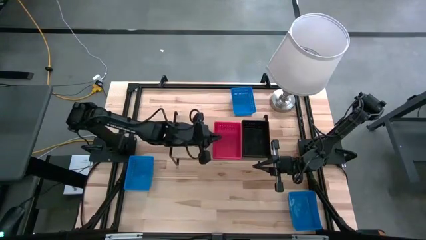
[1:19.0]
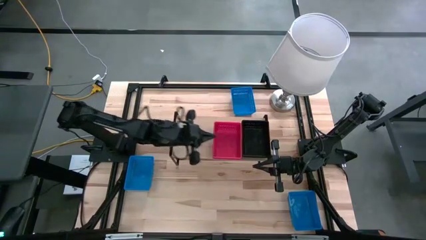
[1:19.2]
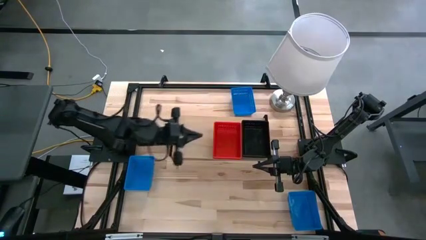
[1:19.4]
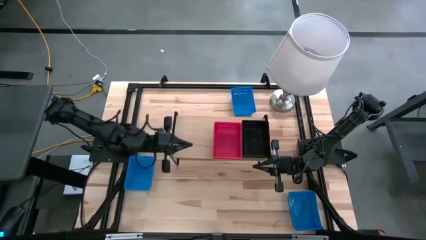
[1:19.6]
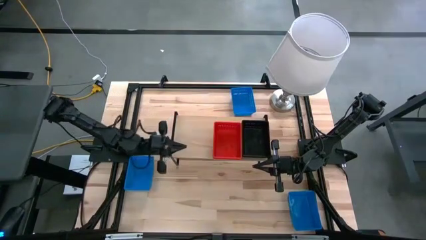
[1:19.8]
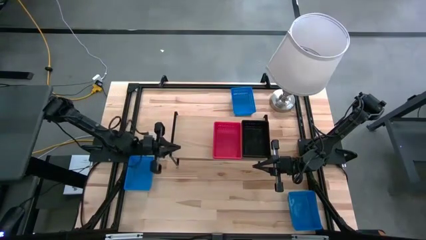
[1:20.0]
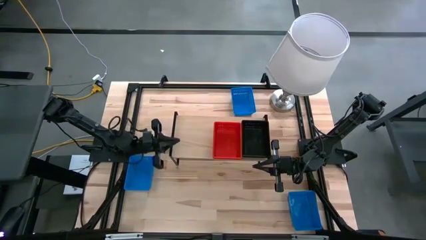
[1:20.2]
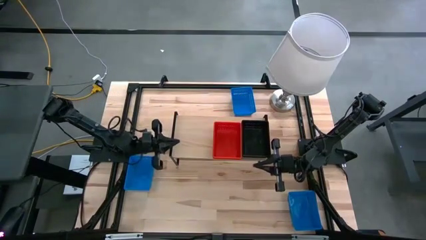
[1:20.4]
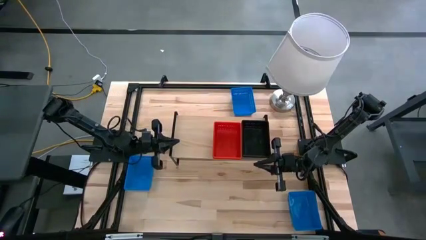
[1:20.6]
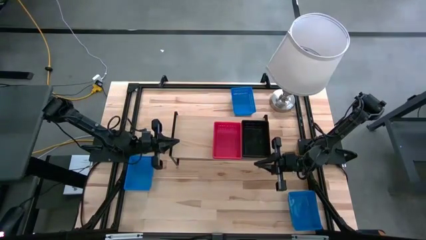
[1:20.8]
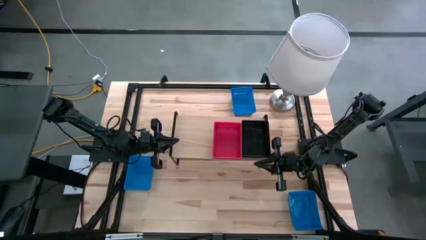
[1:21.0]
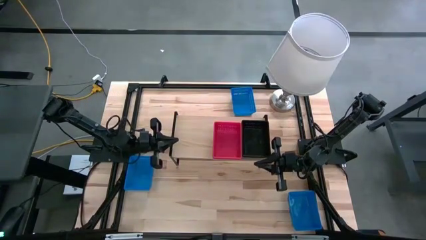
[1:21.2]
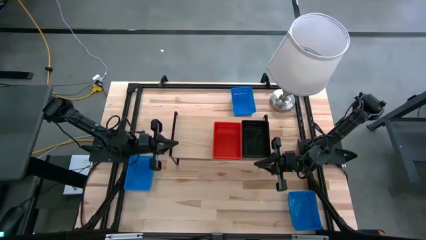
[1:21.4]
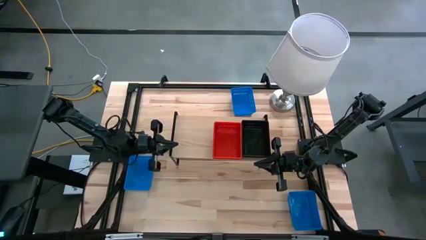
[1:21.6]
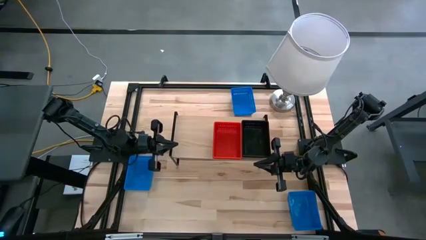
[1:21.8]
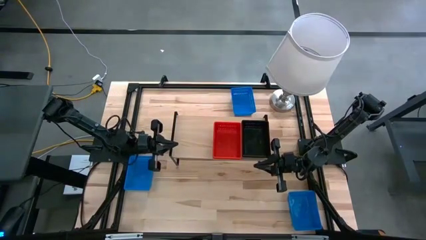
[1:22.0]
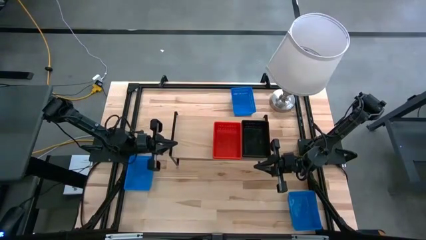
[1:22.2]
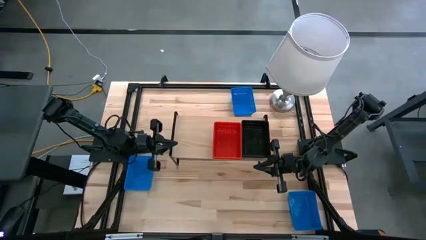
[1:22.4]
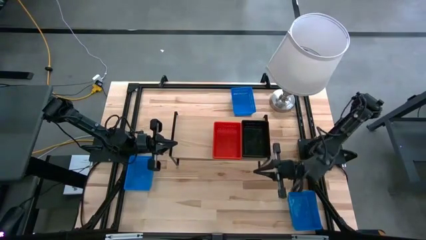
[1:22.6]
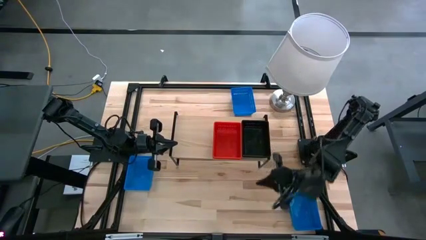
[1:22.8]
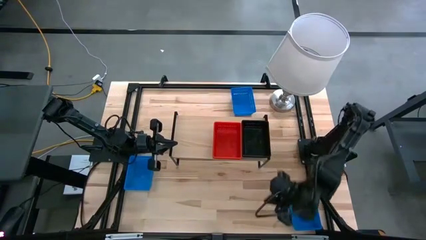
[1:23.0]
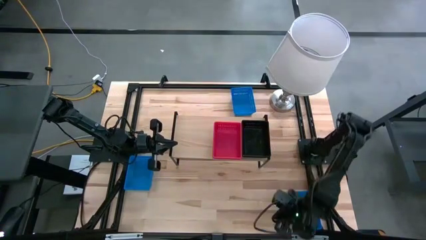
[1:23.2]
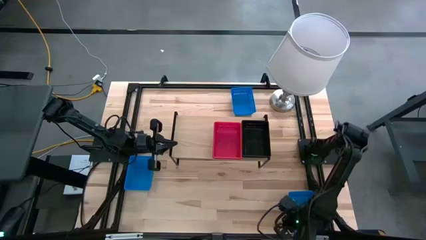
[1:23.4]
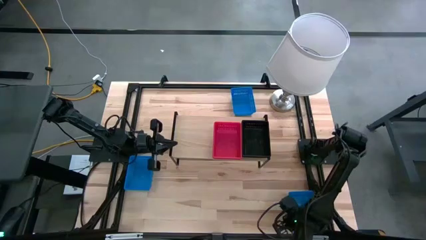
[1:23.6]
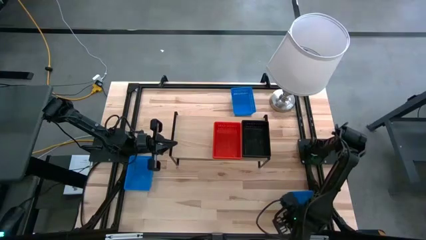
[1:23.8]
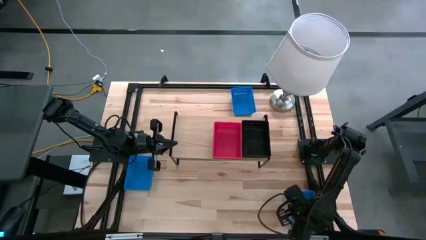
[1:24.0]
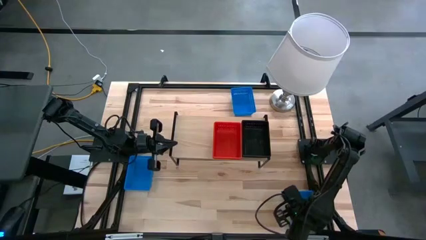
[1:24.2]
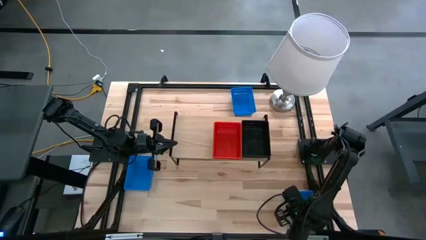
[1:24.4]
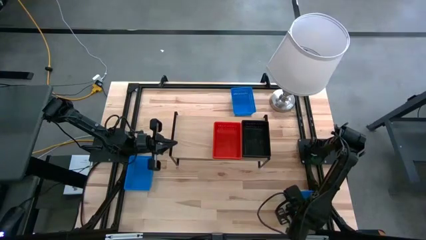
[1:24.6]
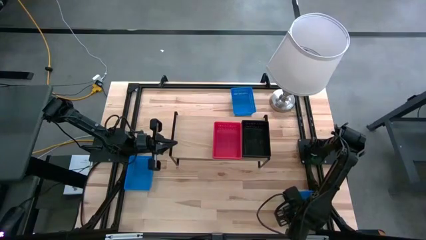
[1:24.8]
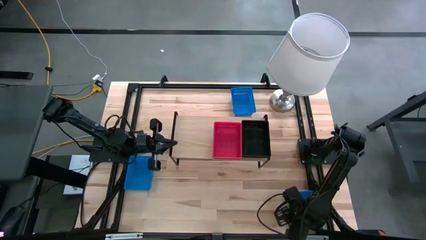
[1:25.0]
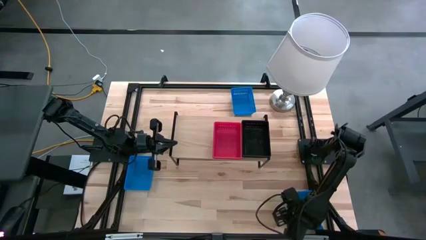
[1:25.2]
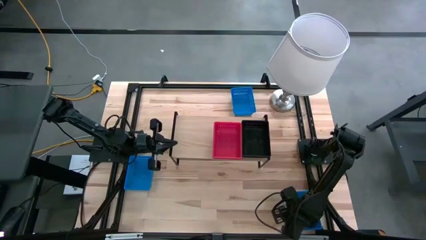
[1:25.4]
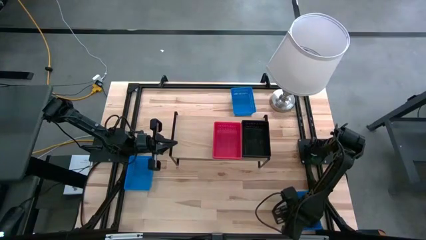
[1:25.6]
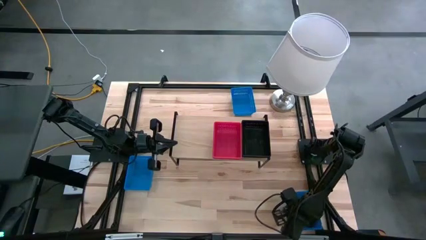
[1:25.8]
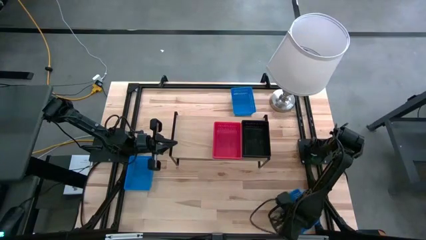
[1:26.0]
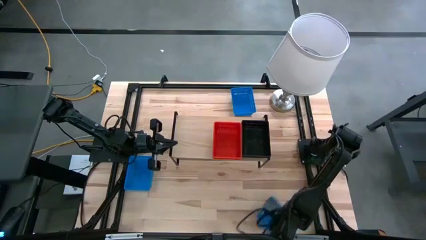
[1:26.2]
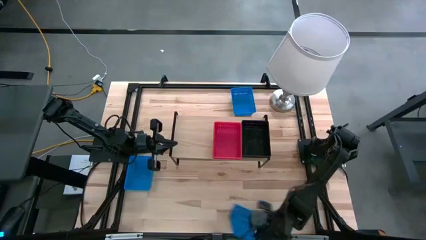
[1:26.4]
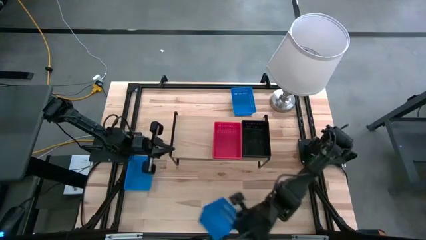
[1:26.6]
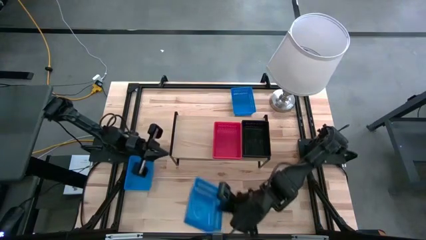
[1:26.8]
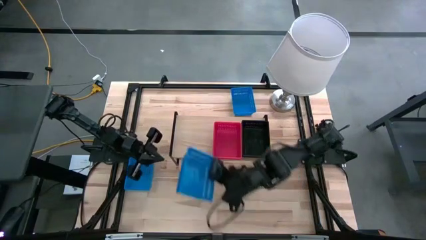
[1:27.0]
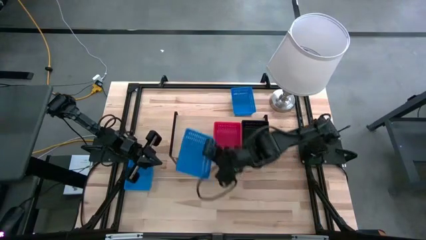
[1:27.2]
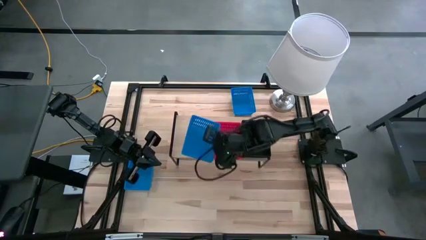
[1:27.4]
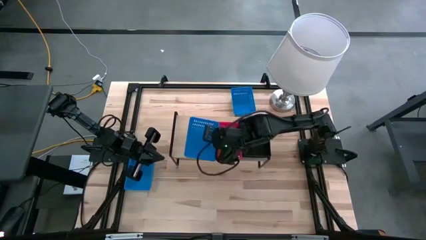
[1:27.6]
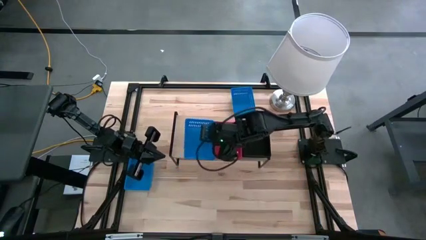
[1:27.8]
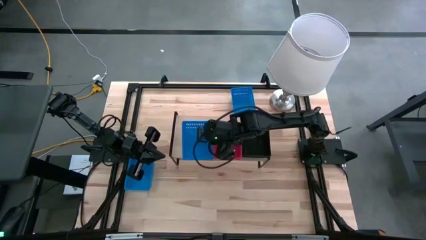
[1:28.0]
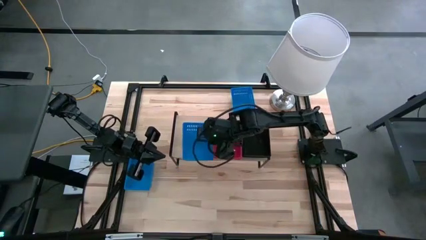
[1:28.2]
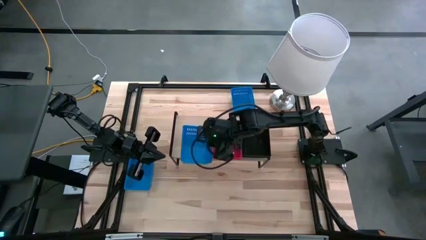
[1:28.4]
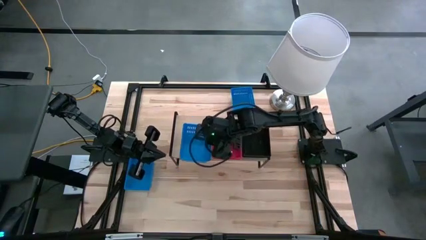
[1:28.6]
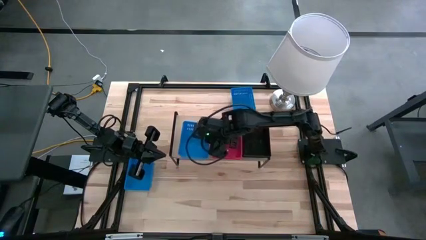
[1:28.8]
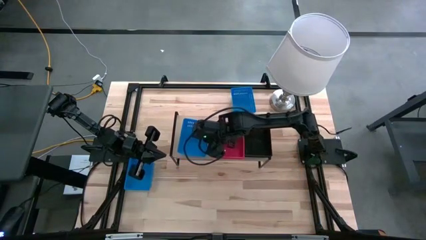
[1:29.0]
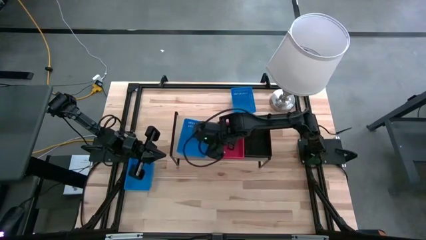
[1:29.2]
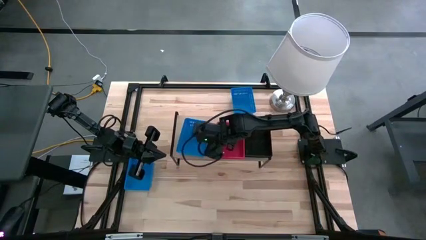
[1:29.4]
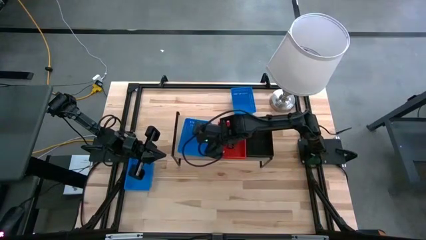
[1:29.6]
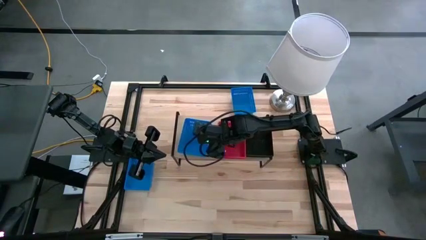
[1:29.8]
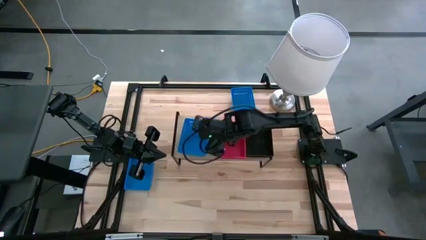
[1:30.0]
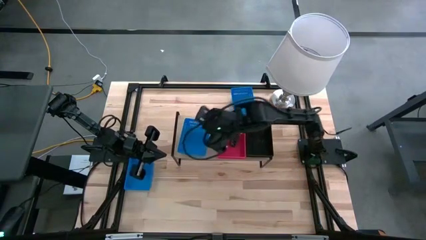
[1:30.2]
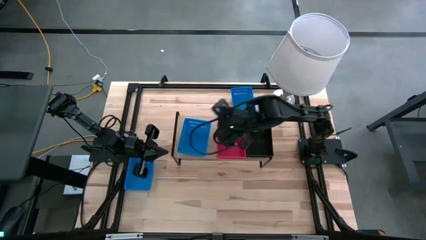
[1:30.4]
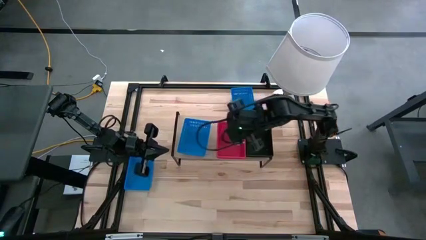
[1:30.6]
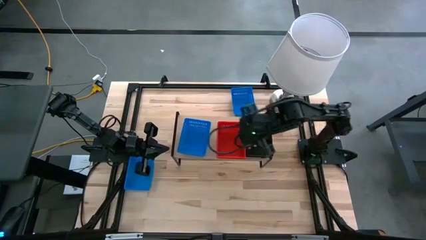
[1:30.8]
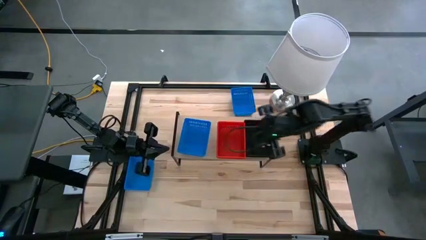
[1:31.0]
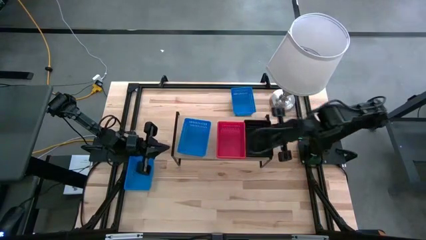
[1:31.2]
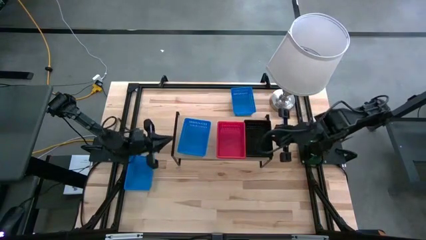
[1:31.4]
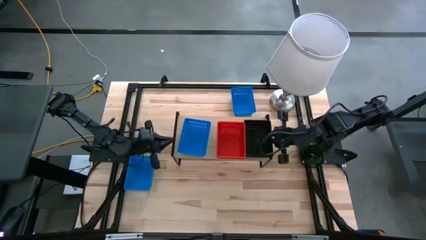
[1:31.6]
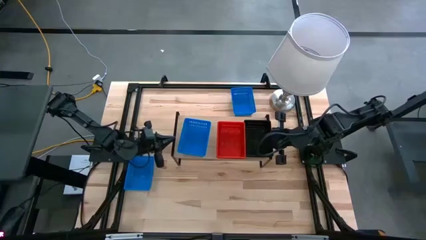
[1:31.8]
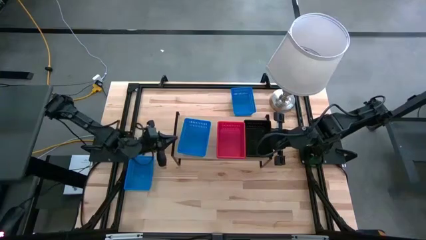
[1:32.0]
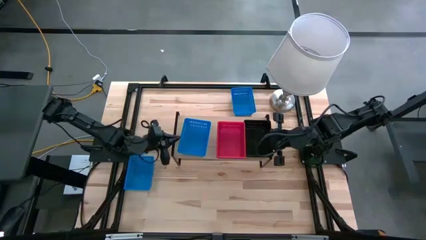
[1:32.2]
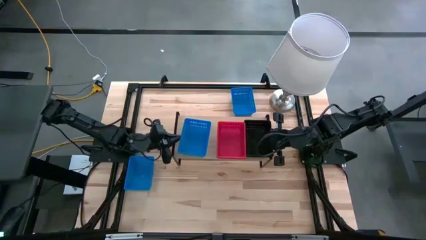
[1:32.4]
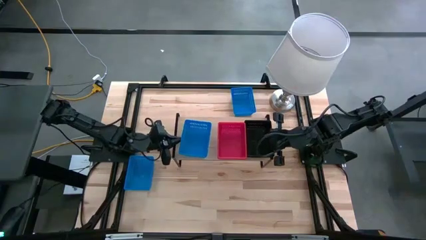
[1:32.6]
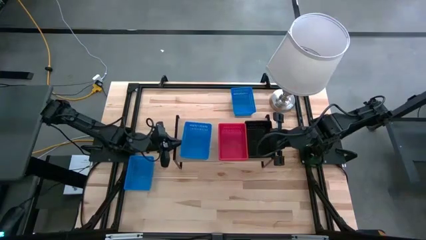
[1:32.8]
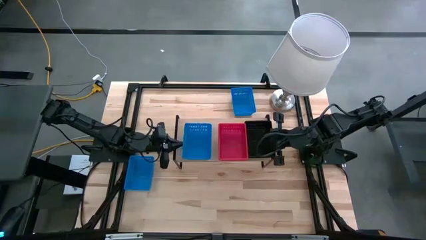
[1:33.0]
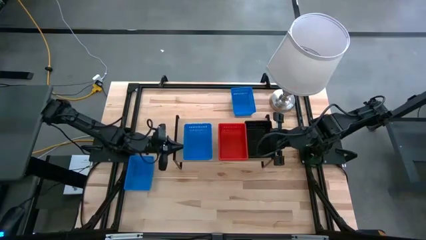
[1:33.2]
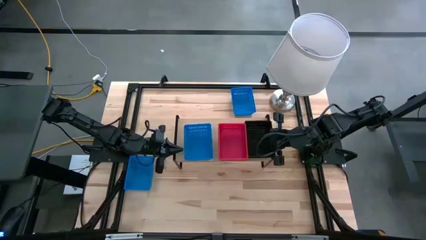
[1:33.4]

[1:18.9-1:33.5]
Task: Stack baskets on shelf by color
Put the bottom right blue bin on the shelf

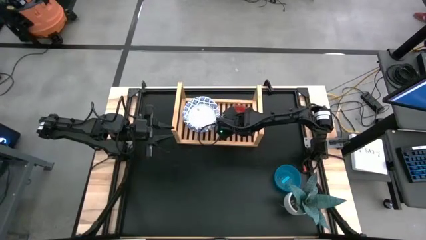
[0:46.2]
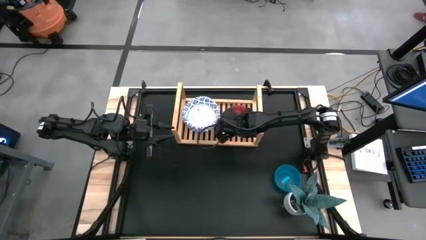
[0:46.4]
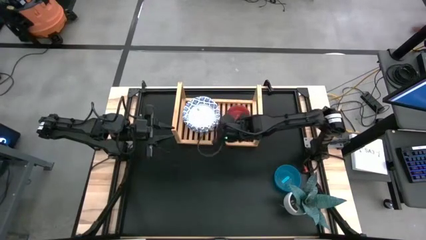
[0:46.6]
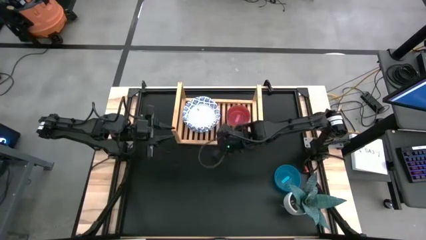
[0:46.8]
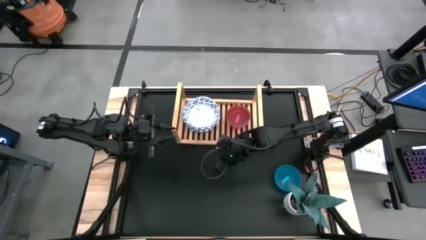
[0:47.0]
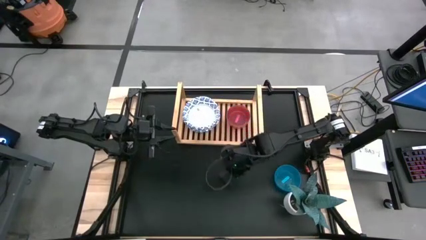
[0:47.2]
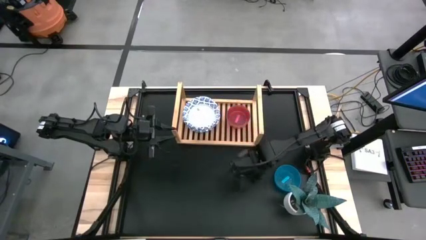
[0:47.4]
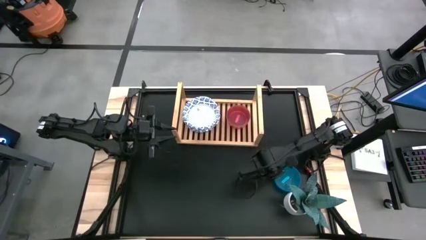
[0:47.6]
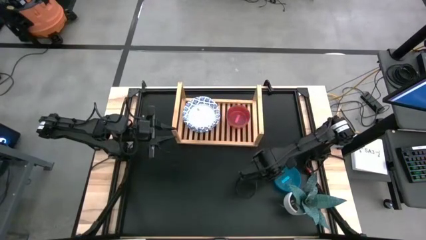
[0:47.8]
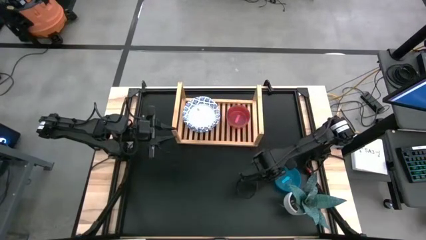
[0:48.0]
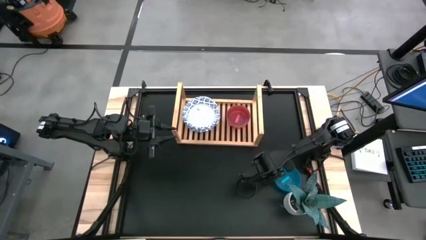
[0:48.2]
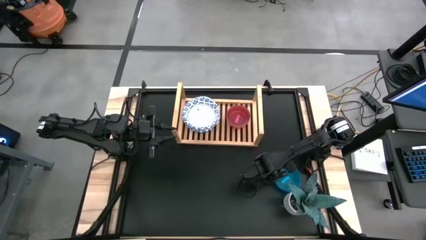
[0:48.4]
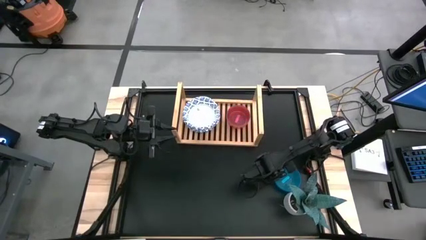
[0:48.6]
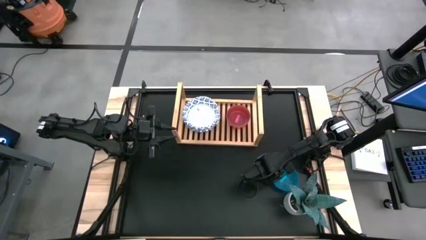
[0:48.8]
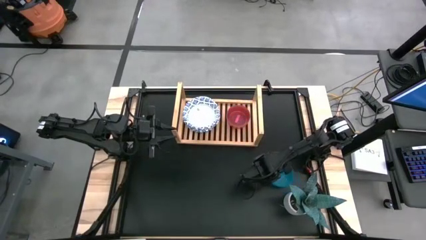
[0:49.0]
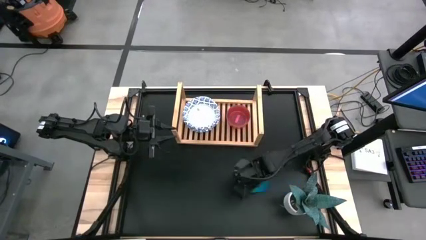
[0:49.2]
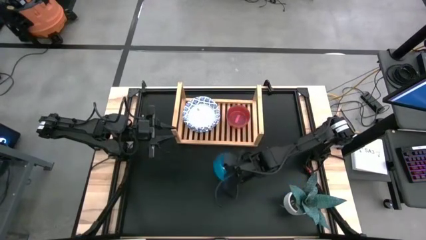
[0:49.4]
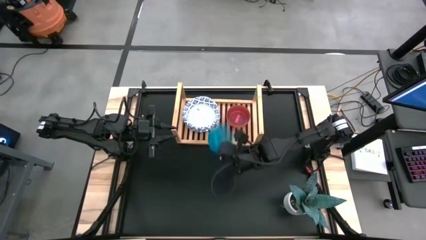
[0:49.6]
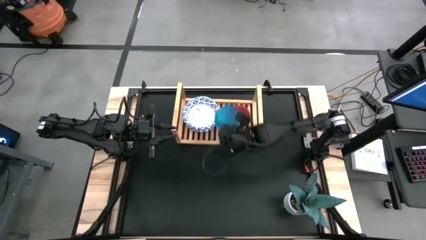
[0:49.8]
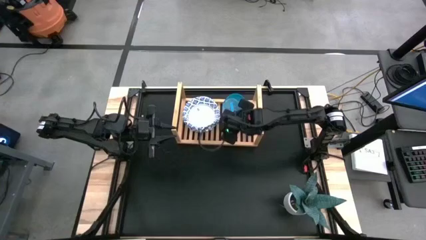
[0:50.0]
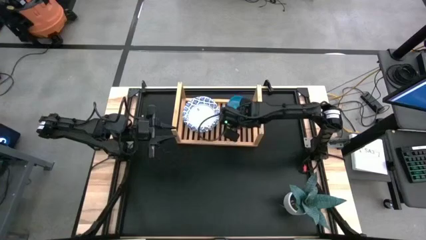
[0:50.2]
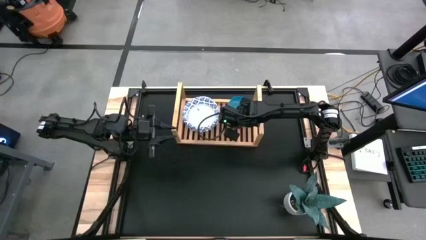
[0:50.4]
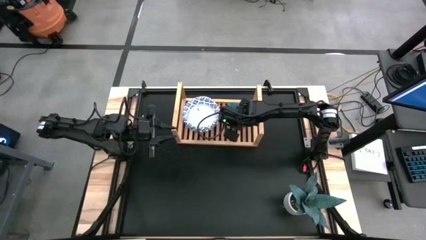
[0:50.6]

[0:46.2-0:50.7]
Task: Place and stack bowls onto a shelf
Stack the small blue bowl on top of the small pink bowl on the shelf
